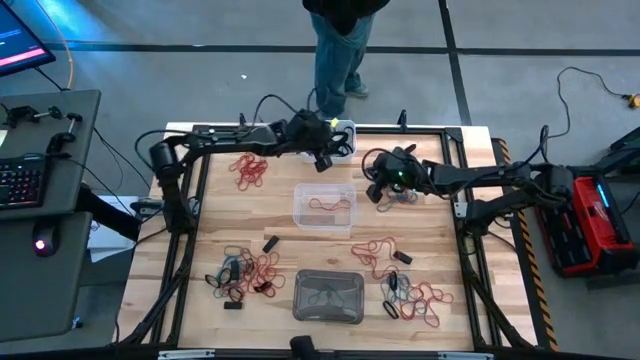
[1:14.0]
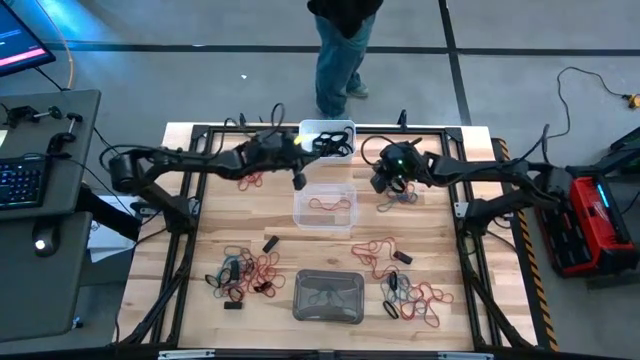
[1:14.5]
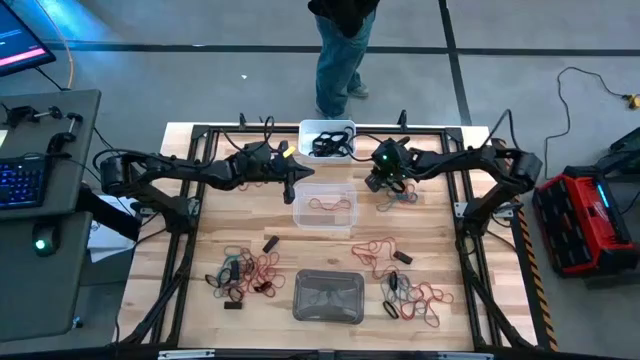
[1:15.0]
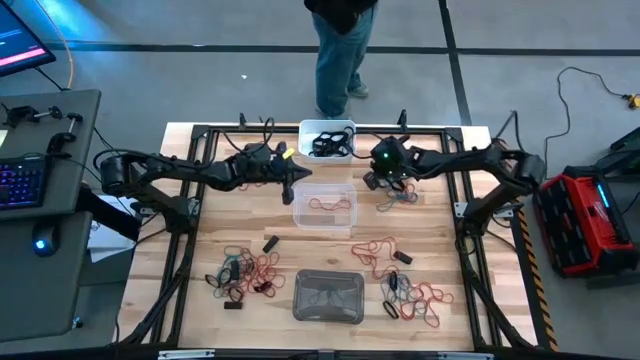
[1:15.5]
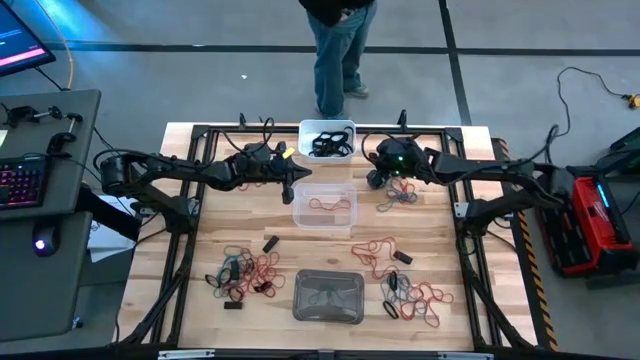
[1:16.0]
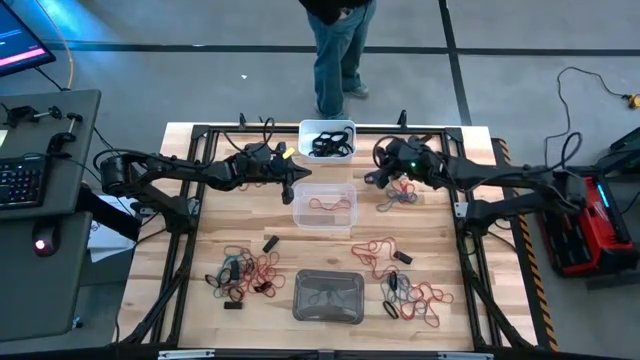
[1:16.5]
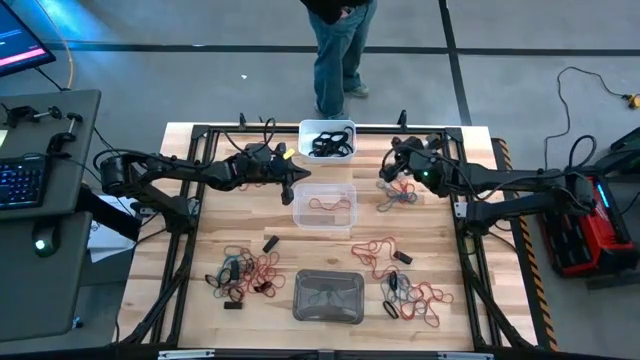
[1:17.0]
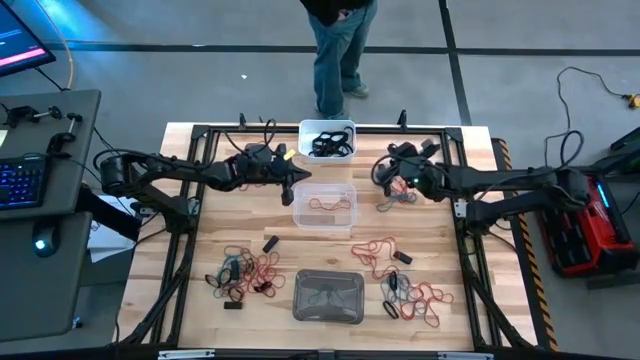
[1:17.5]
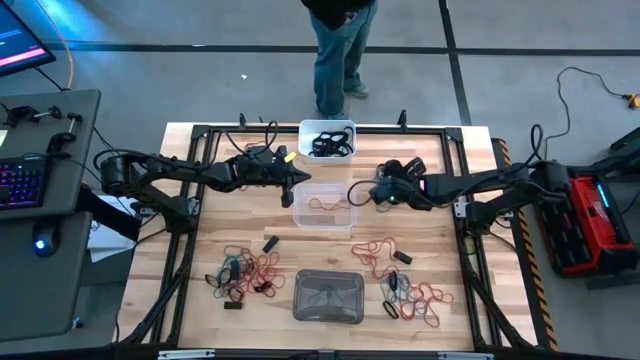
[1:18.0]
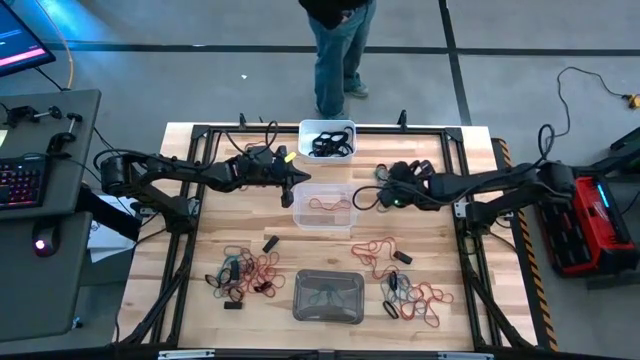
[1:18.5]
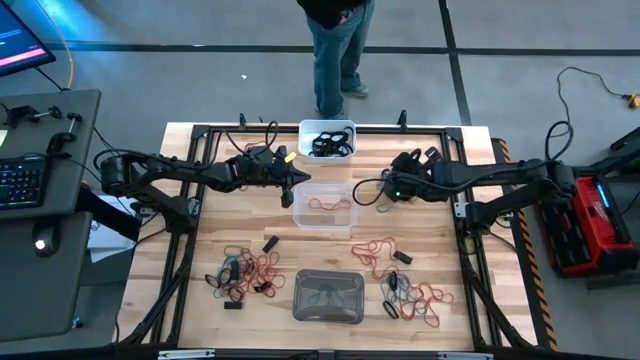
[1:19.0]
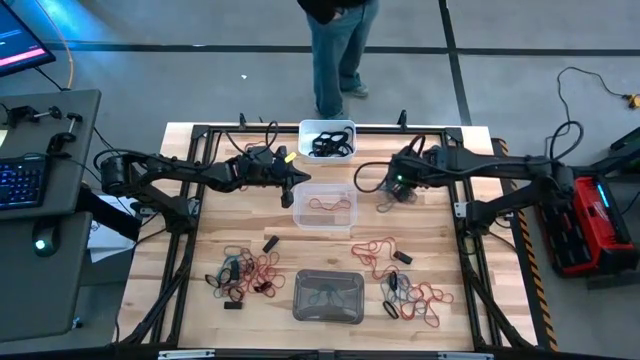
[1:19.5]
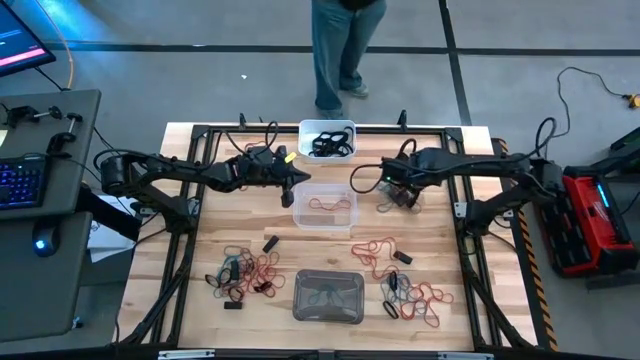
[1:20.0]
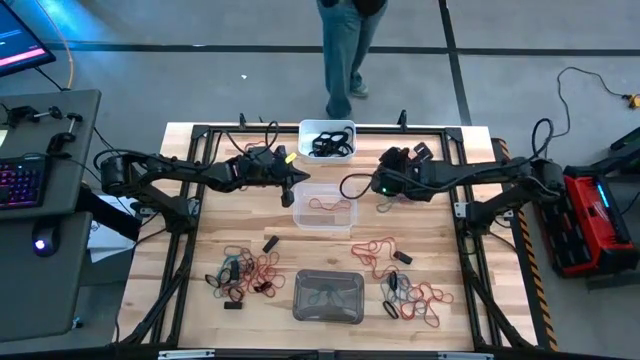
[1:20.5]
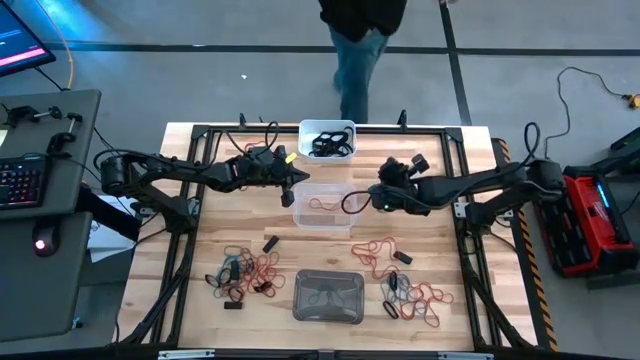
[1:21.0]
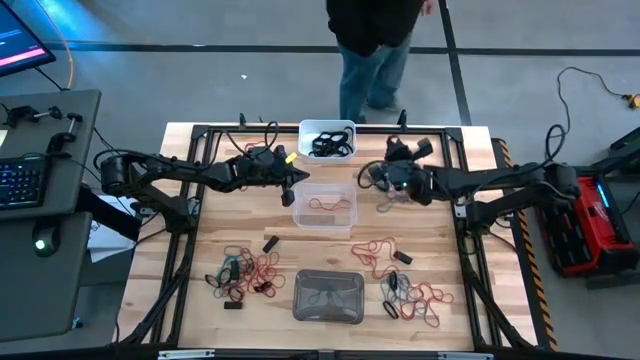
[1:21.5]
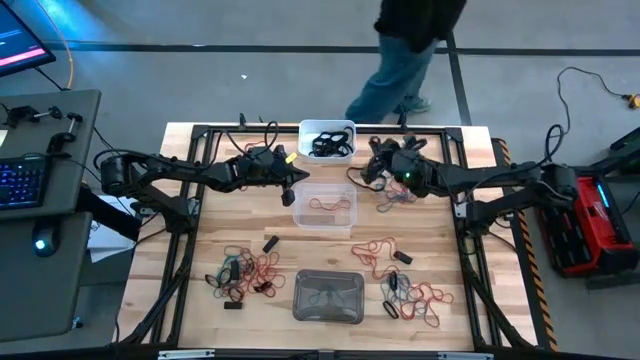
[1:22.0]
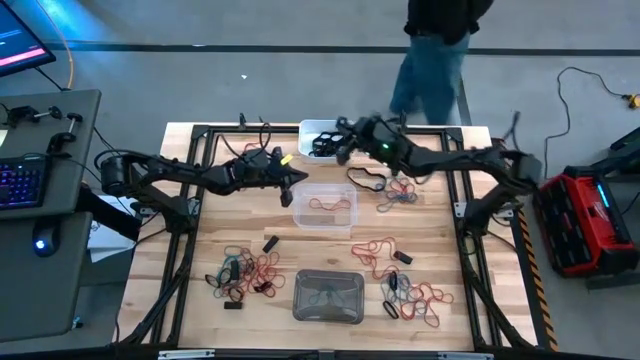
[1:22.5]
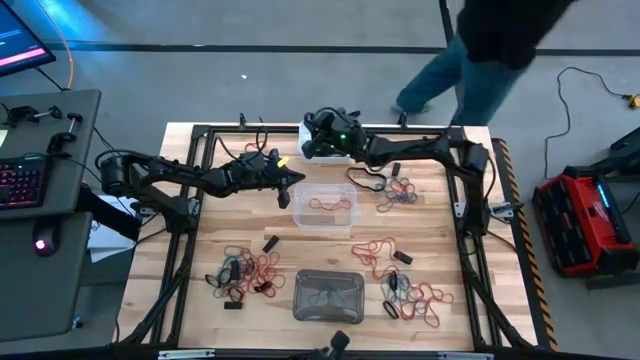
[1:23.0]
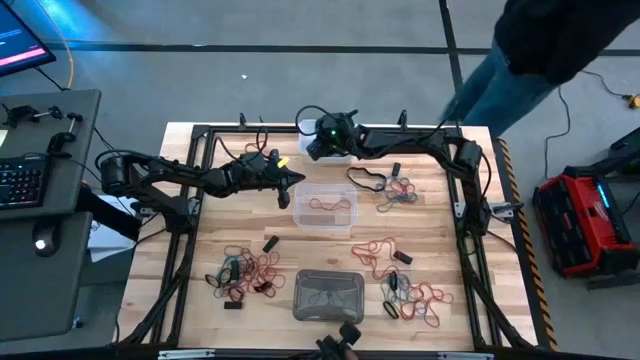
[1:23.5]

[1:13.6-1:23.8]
Task: Sort rubber bands into baskets
Put the black rubber band into the white bin

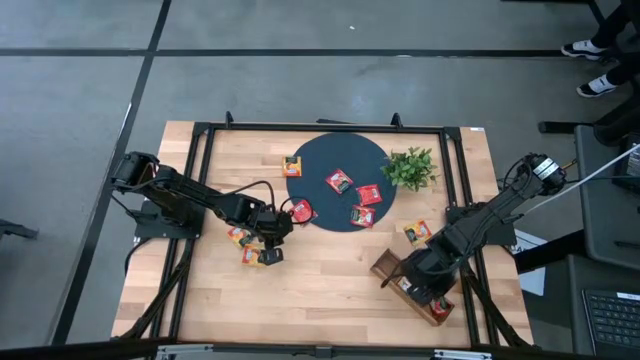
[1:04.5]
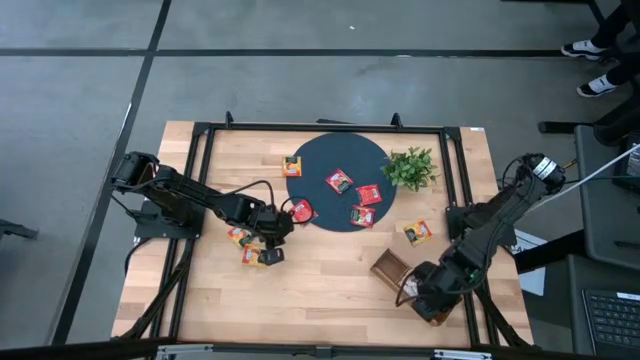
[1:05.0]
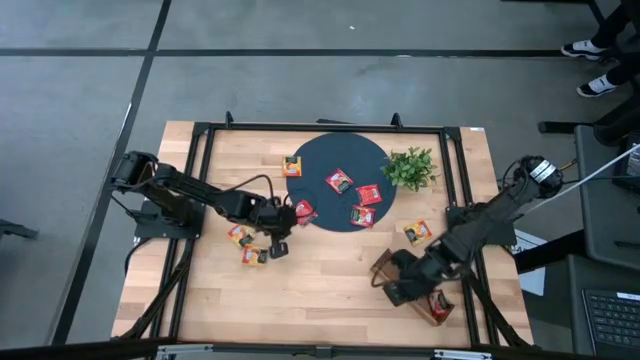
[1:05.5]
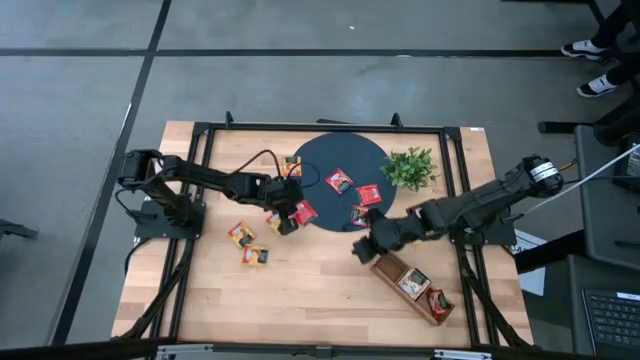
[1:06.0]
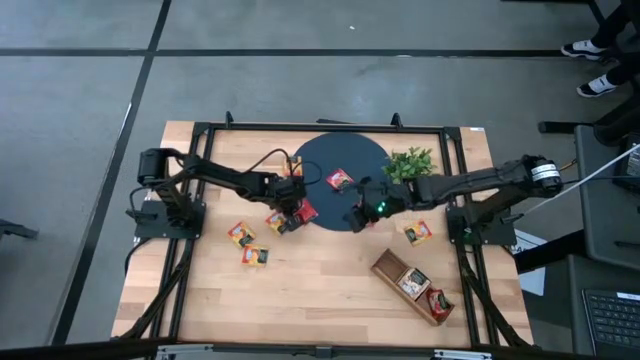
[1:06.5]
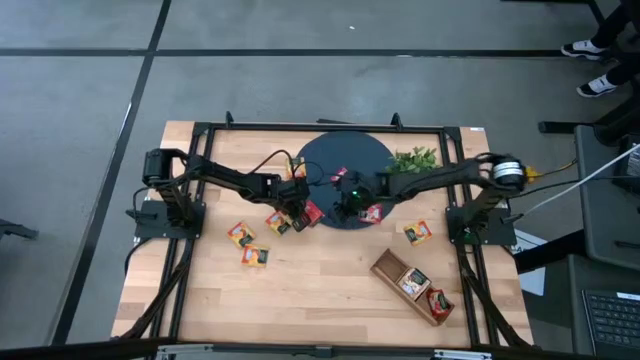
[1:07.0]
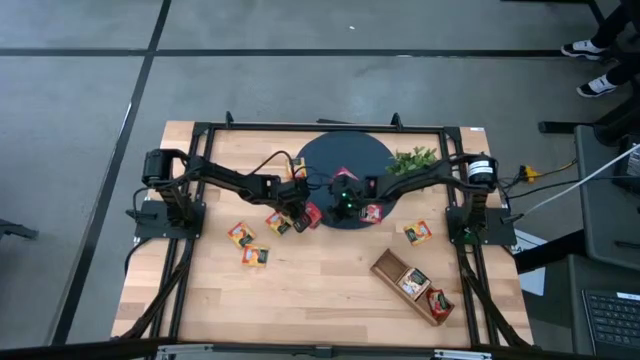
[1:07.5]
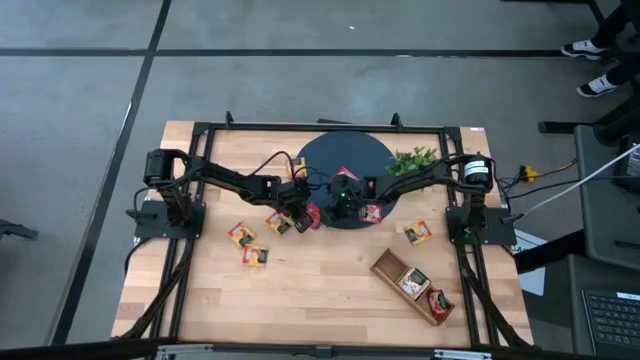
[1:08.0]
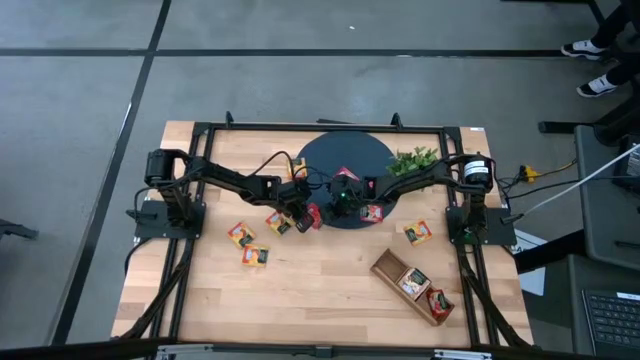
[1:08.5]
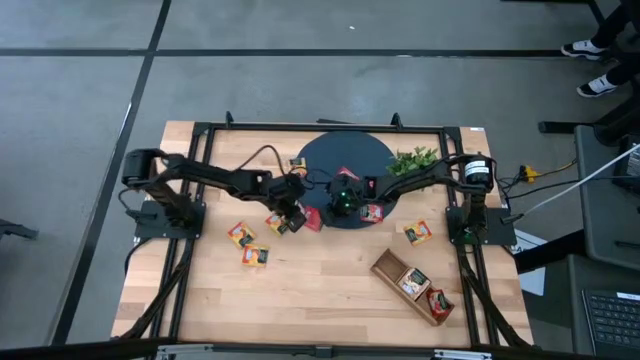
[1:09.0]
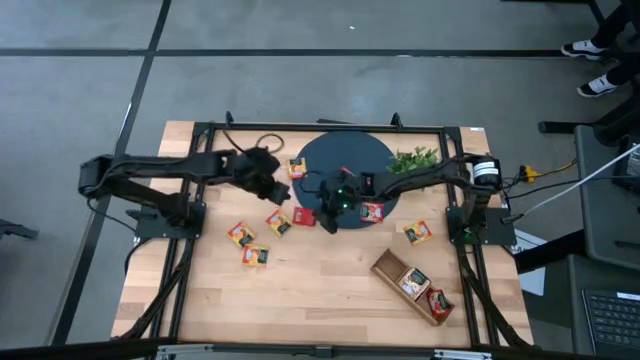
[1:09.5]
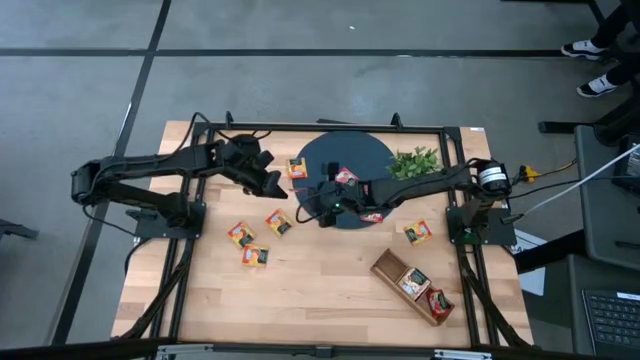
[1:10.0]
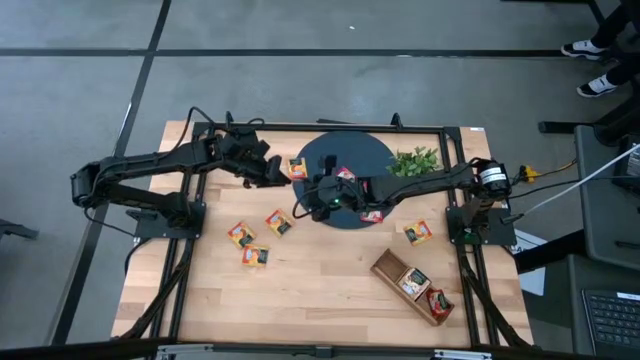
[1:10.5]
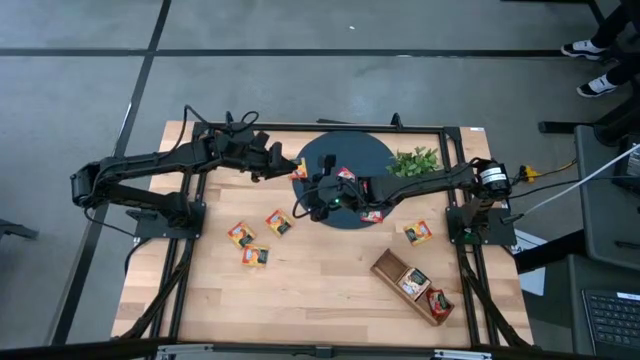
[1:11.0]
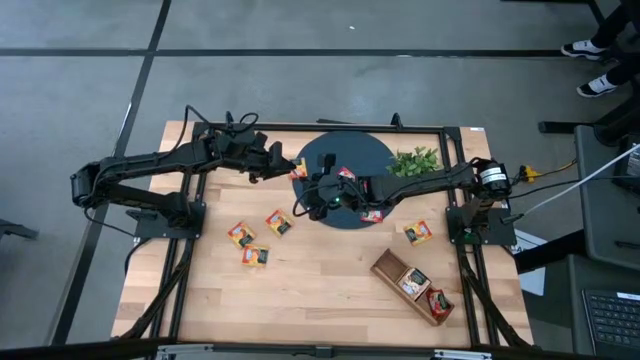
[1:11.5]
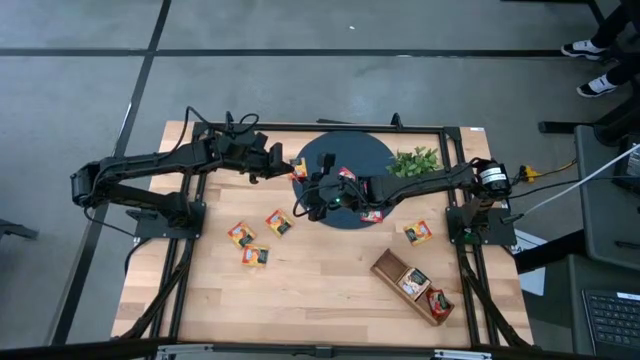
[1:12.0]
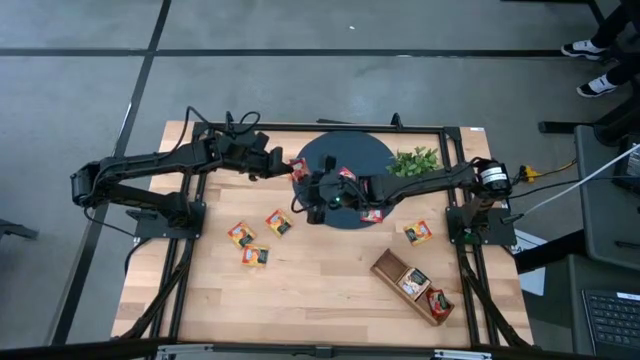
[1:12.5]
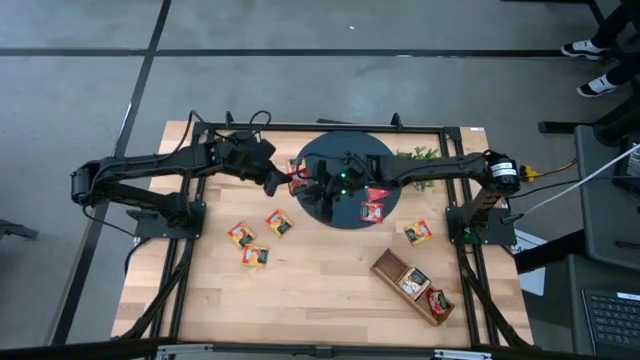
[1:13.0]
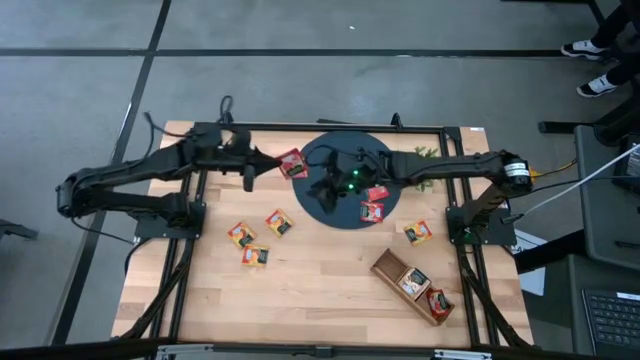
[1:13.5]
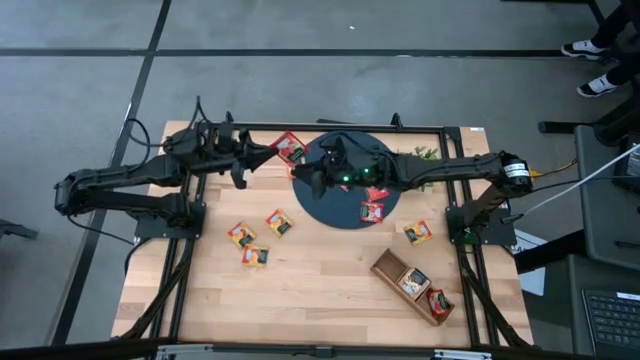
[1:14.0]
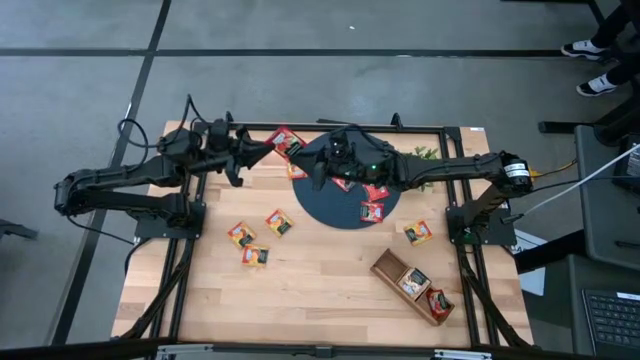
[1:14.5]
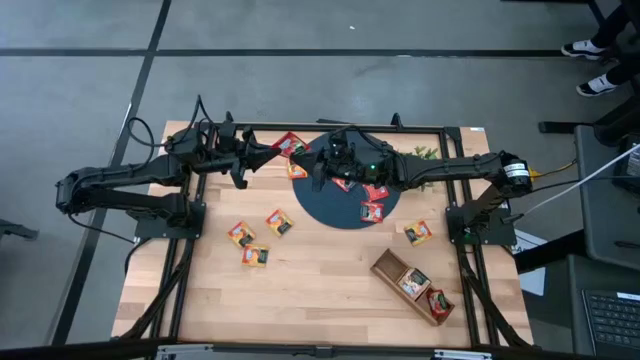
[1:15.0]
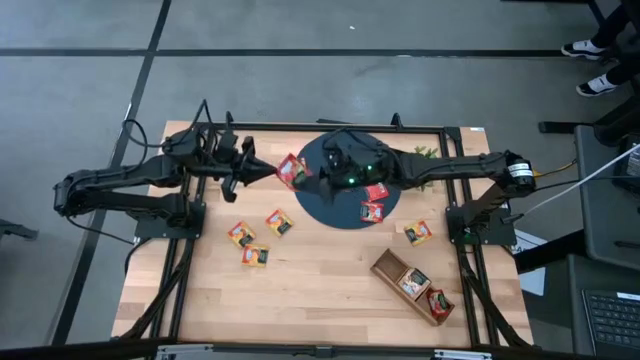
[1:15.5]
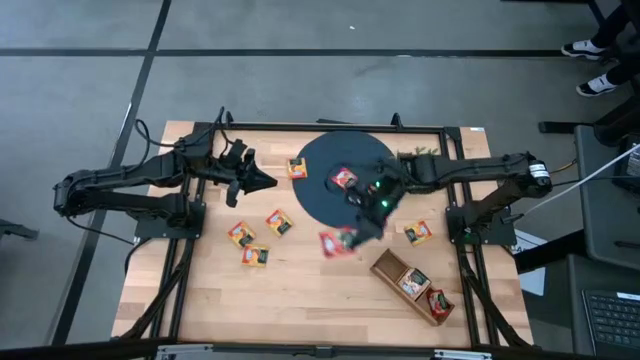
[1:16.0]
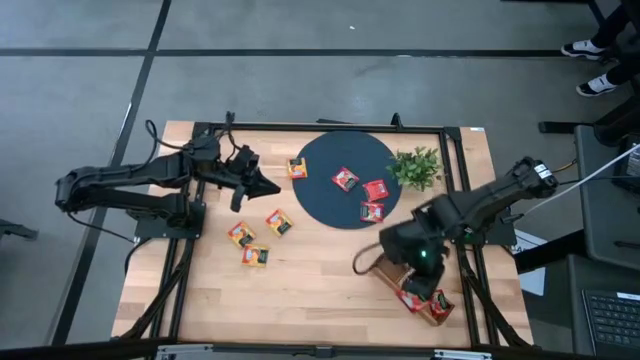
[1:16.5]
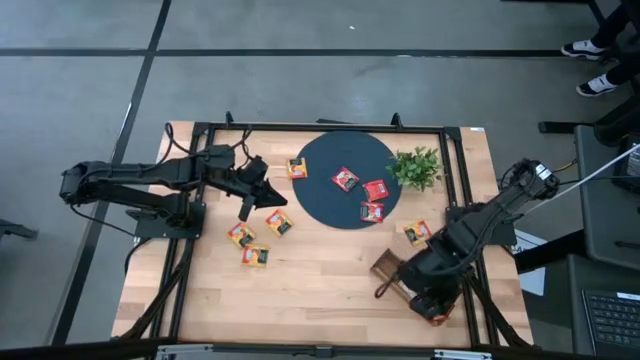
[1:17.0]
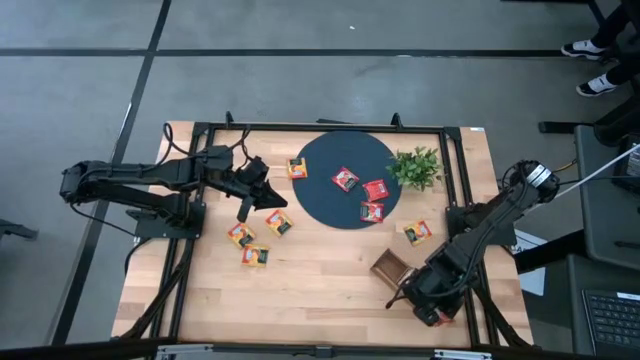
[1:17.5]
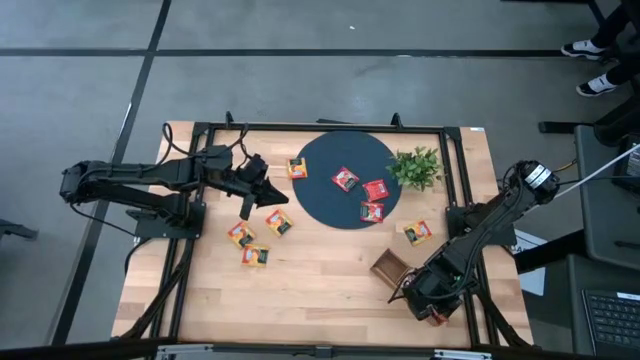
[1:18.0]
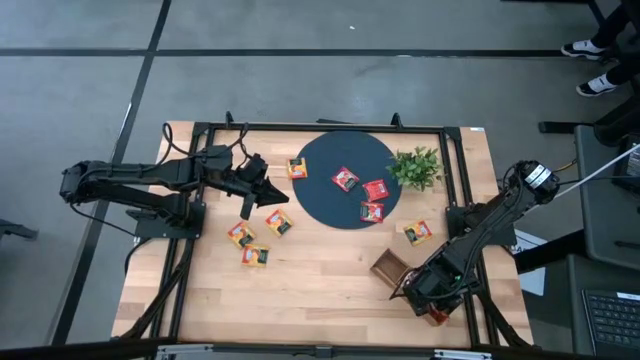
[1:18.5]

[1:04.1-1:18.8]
Task: Pick & Place Tea
Put the red tea bag into the right section of the wooden organizer
